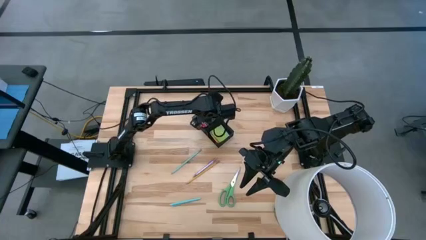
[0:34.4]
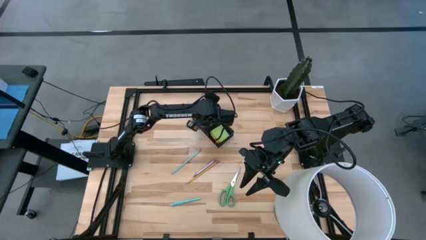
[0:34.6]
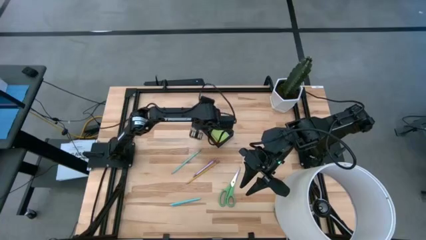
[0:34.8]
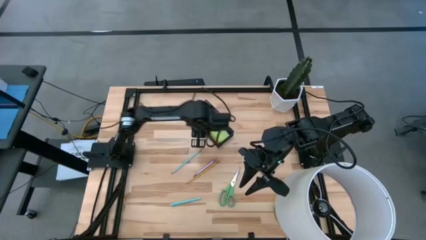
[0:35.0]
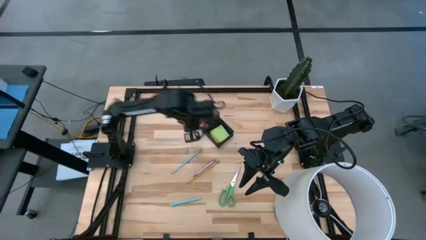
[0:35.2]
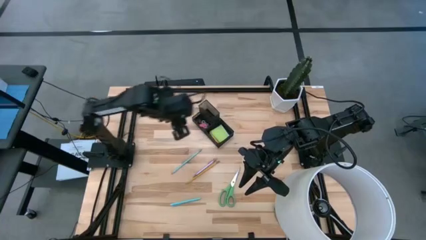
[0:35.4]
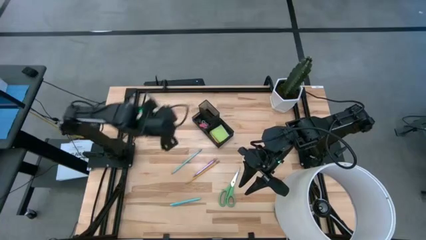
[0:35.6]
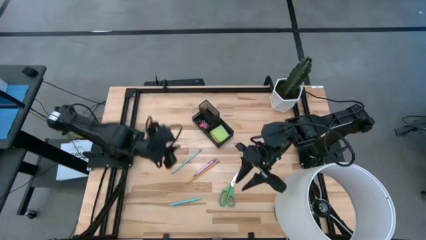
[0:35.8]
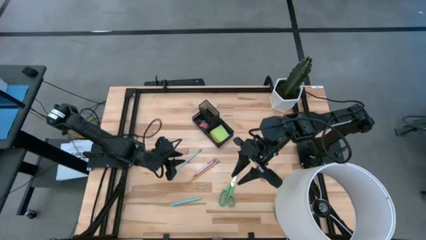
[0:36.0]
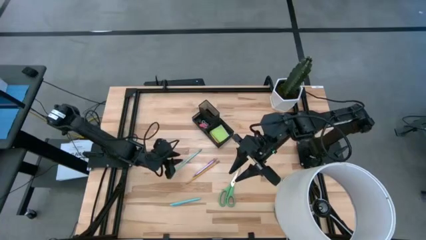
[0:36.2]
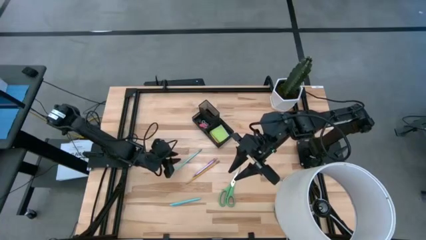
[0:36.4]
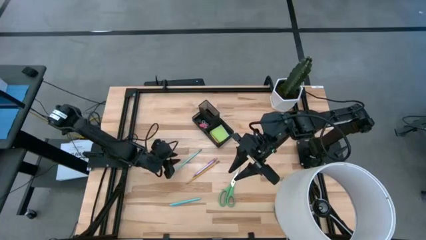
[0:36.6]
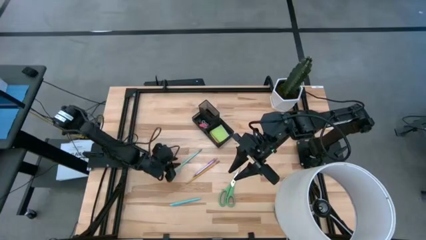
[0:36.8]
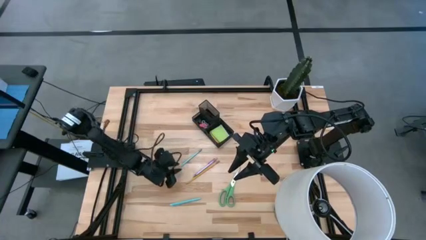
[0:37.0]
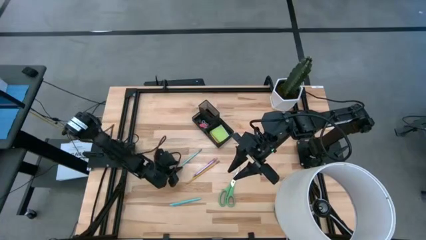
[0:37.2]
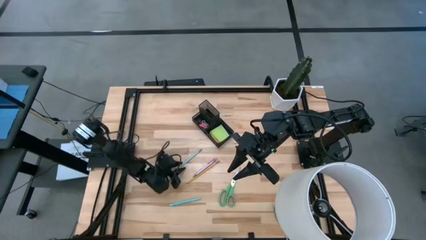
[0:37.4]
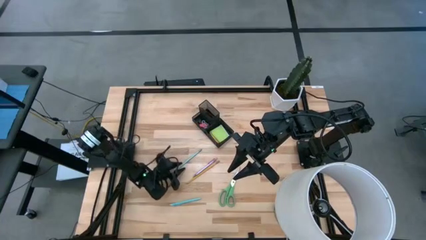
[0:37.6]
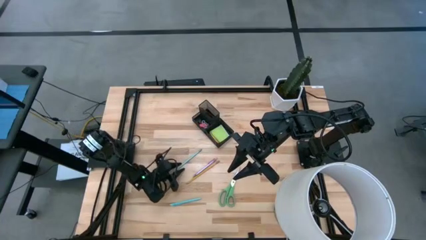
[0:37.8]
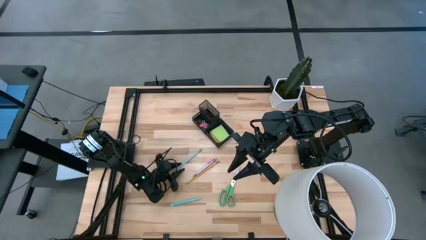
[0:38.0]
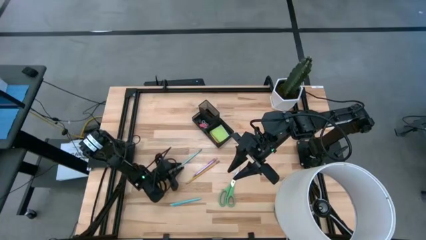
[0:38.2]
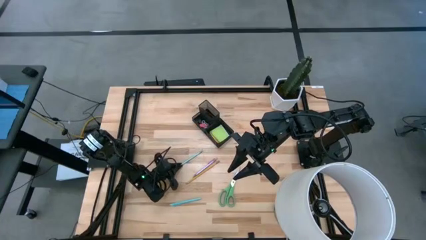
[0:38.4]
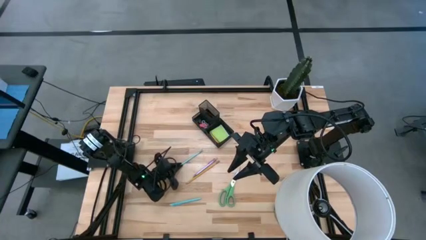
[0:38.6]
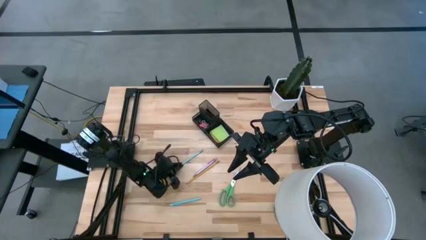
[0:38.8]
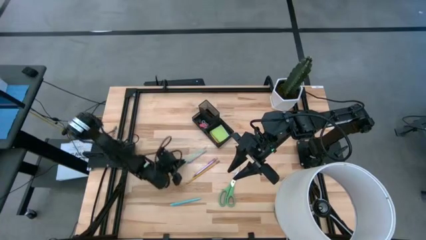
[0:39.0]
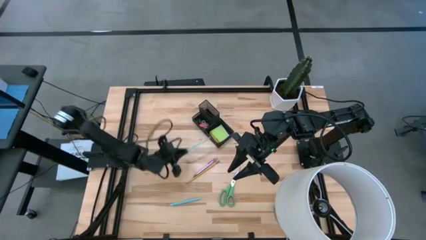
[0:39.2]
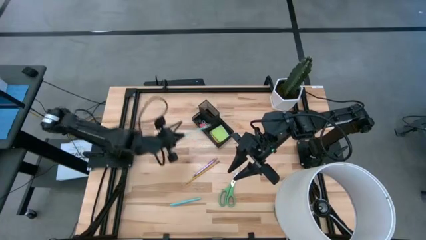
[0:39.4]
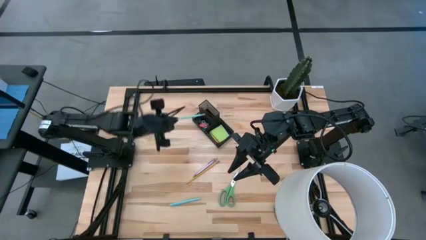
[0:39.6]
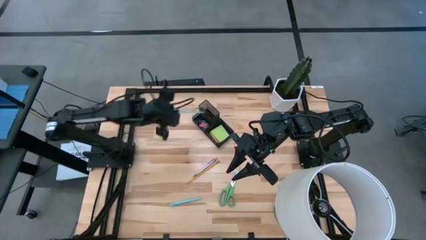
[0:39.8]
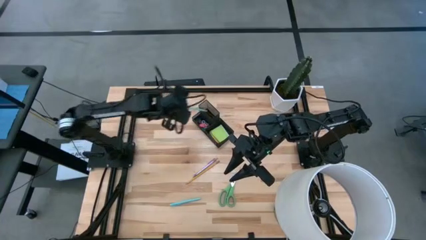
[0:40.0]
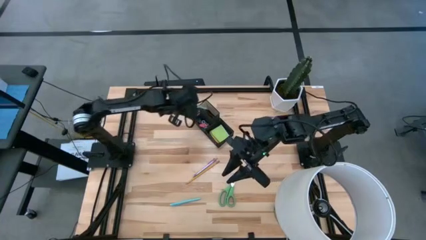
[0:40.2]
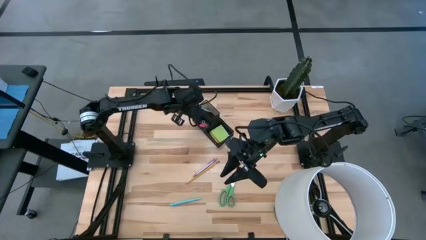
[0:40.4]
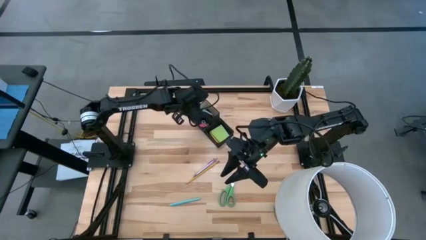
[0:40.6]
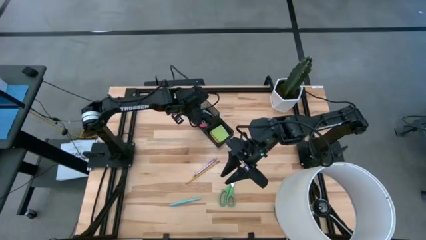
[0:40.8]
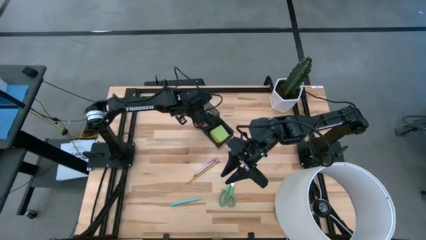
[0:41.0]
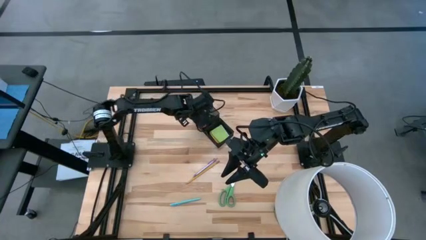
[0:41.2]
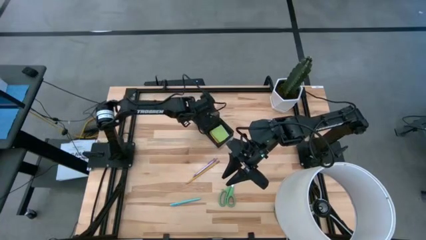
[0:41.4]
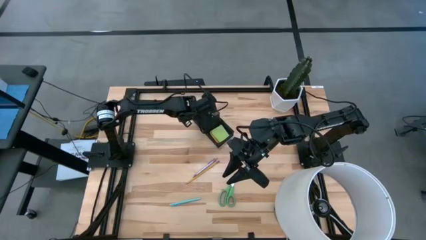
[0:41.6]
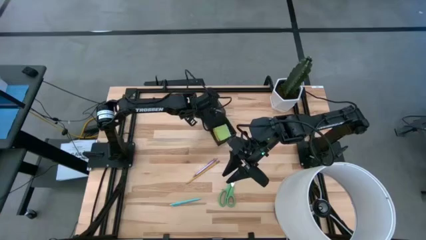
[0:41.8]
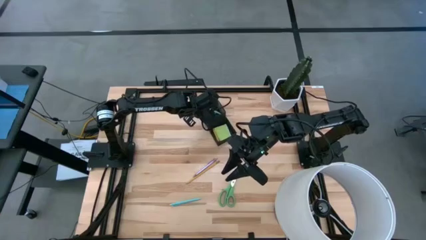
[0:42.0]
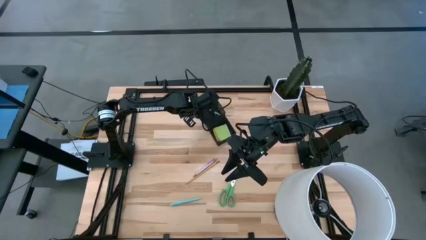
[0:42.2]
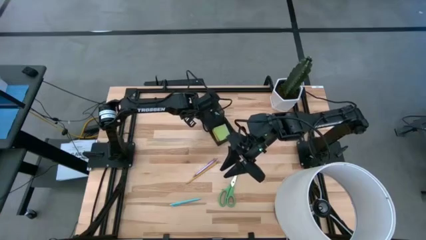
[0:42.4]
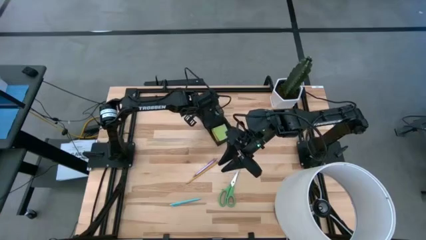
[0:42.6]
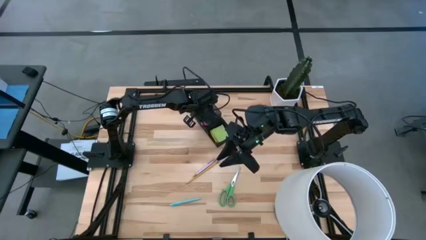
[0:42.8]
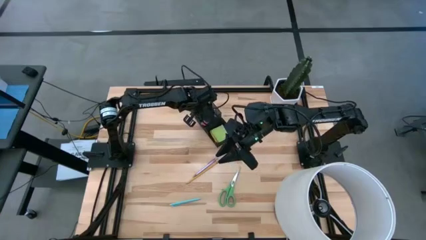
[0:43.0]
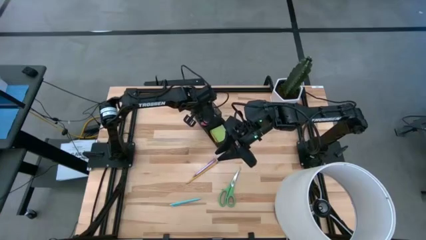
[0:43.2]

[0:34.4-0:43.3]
Task: Pick and place office supplies into organizer
Put the blue pencil into the black desk organizer

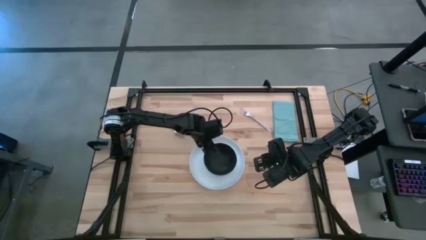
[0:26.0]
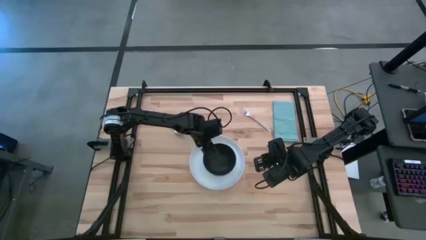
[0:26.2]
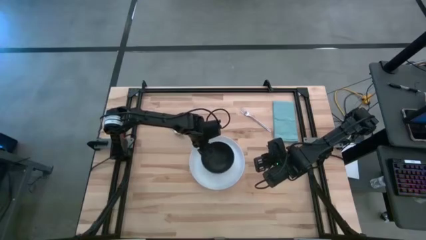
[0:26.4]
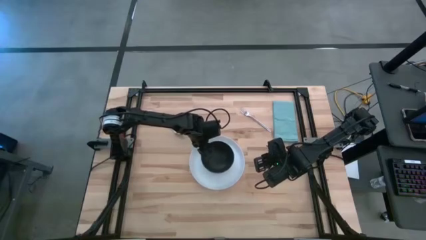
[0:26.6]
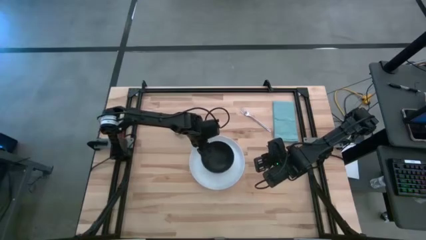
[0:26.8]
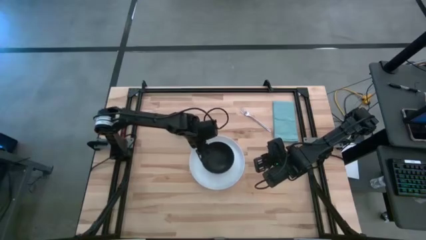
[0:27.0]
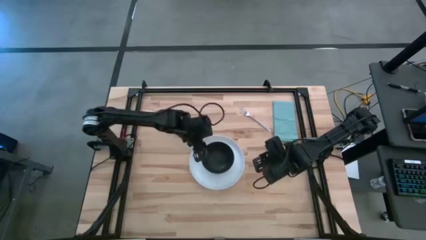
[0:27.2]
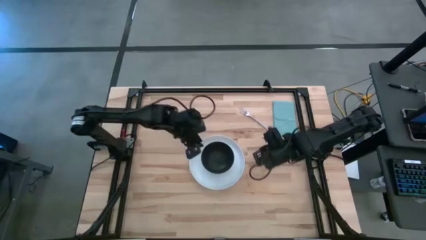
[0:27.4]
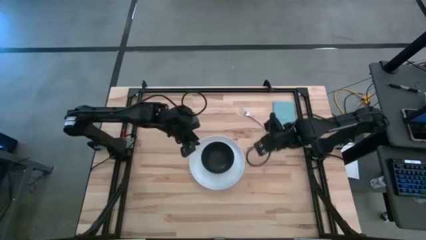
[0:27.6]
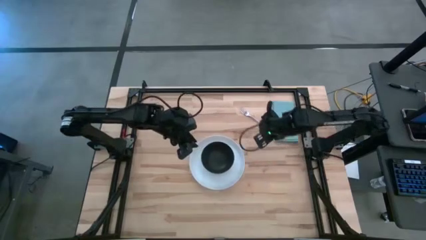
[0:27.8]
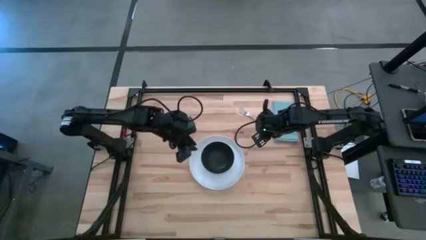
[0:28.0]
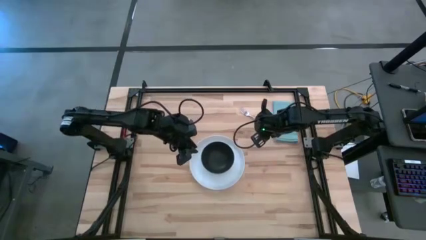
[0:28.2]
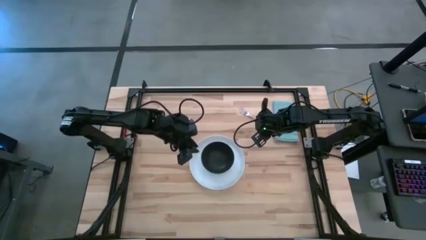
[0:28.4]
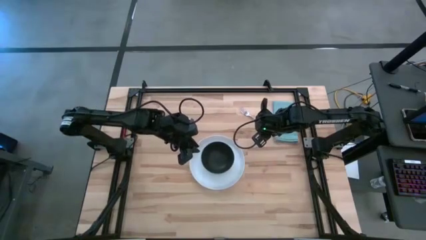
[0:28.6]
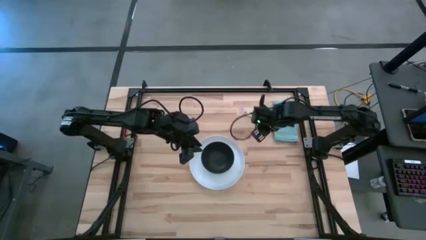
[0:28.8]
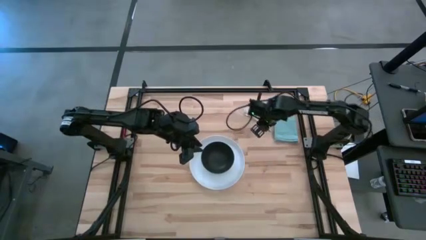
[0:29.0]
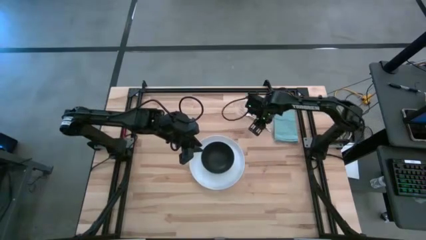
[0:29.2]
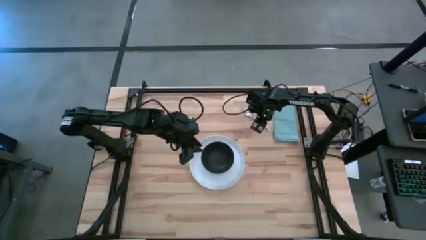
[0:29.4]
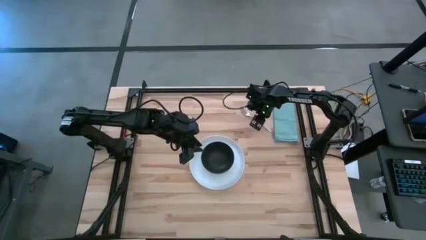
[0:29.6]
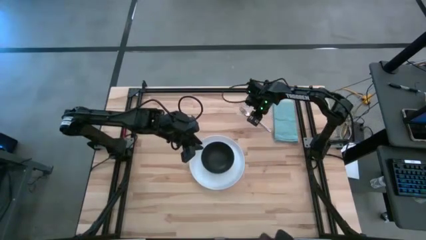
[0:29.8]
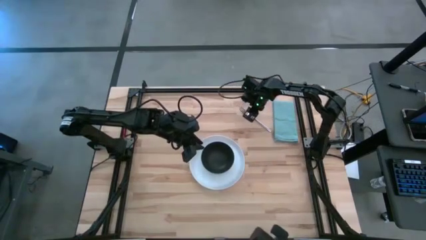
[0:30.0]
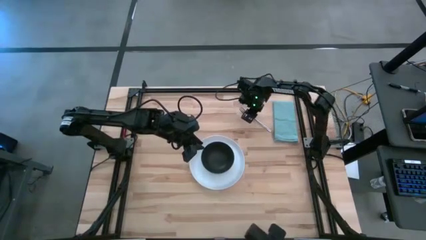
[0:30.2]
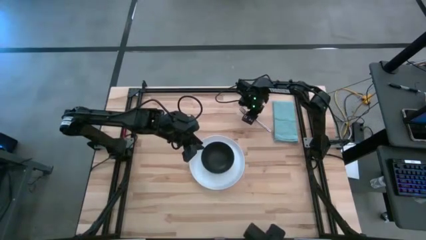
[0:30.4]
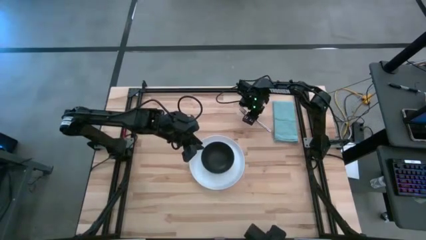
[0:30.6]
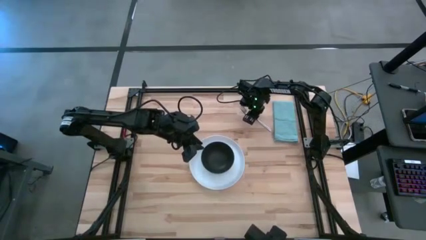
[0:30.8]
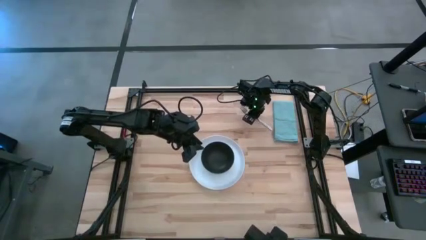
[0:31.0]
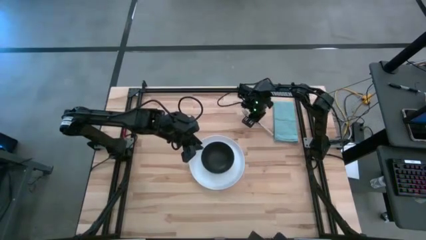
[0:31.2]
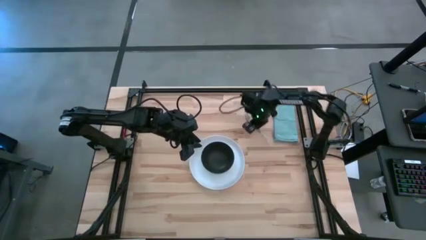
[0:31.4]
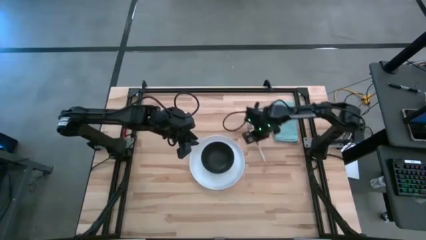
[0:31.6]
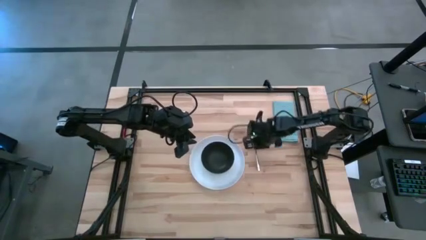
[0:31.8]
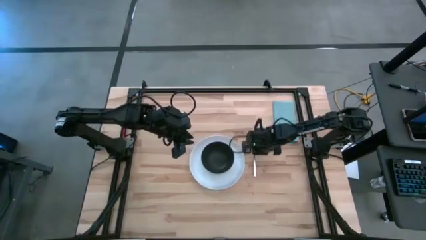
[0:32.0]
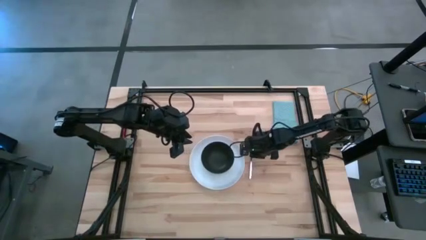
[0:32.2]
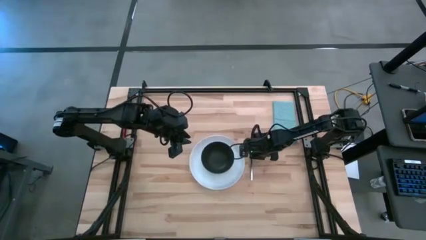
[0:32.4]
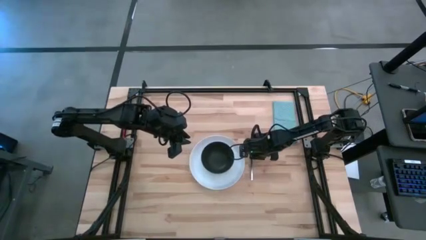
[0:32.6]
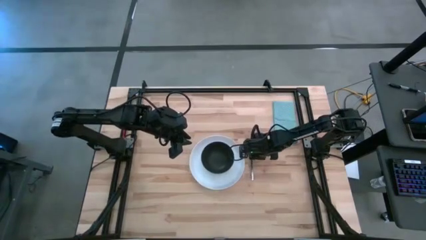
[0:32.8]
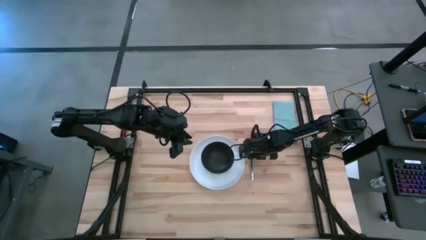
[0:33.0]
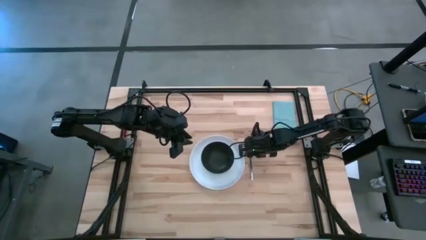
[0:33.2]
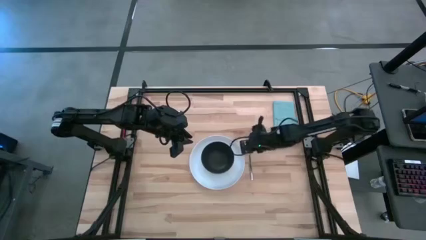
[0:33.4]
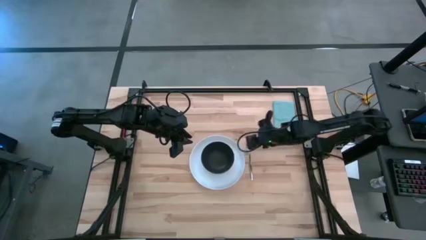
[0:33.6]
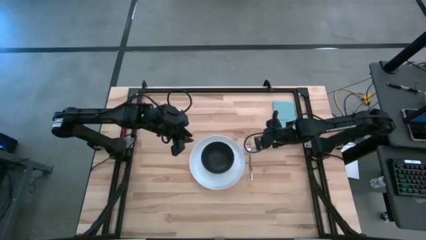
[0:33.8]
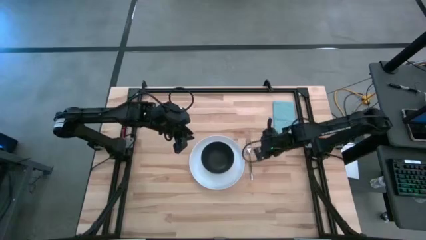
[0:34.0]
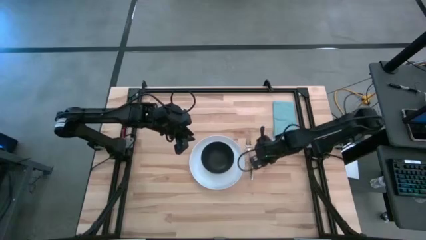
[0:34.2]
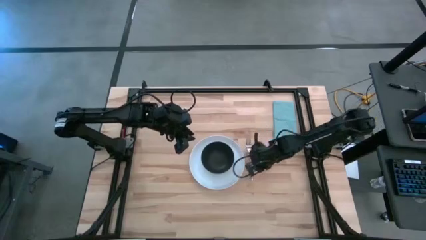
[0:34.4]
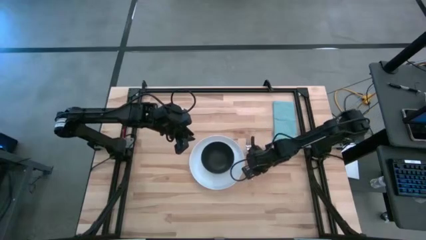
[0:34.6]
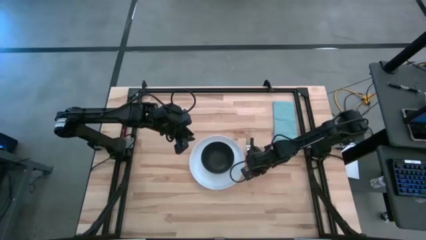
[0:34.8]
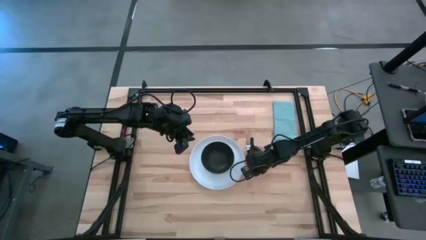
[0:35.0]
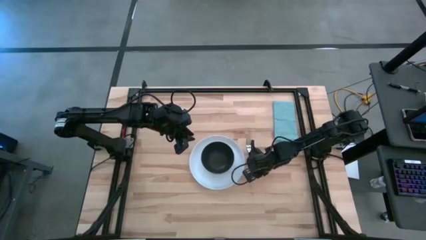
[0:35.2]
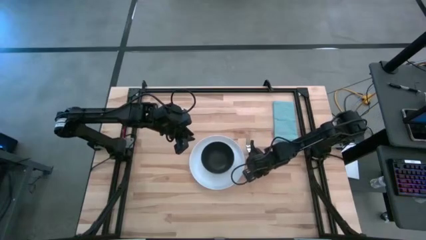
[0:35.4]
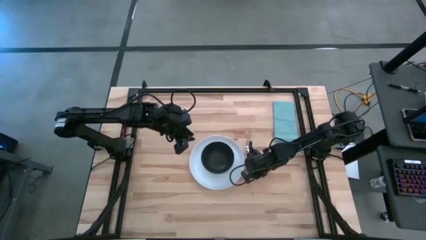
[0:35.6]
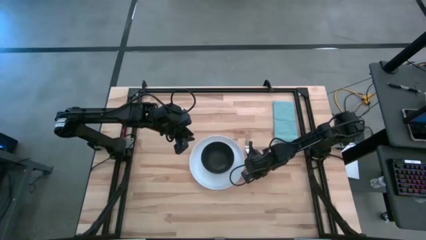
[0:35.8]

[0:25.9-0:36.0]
Task: Set table place
Put the fork to the right of the white plate
